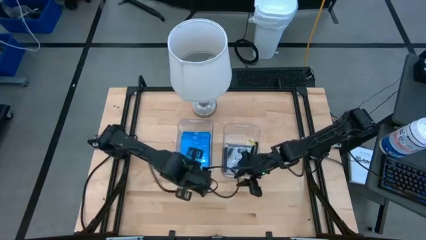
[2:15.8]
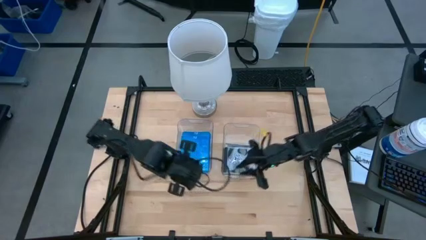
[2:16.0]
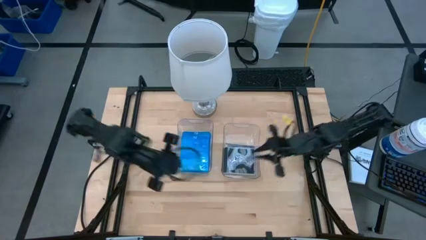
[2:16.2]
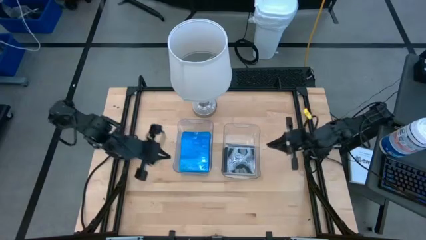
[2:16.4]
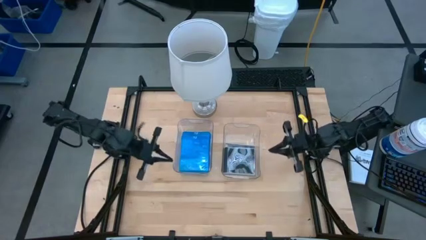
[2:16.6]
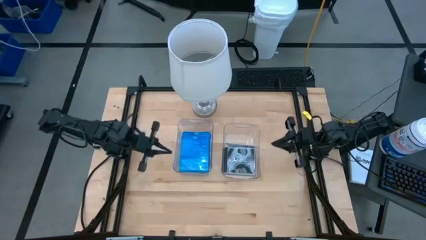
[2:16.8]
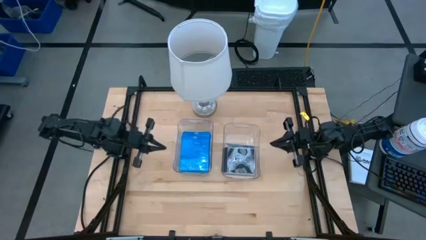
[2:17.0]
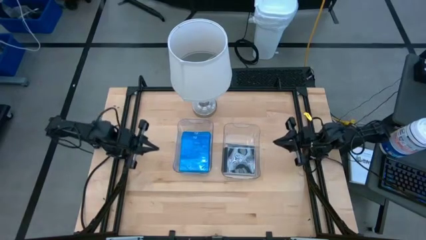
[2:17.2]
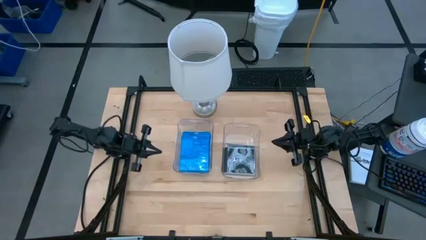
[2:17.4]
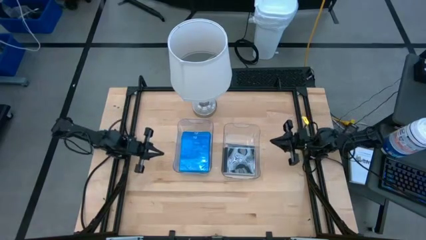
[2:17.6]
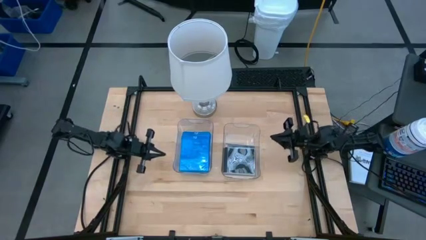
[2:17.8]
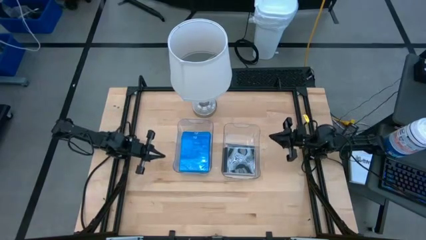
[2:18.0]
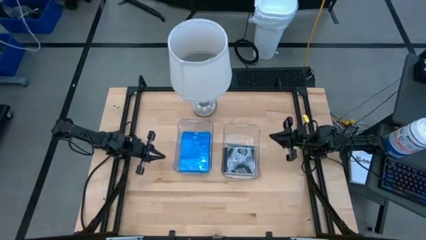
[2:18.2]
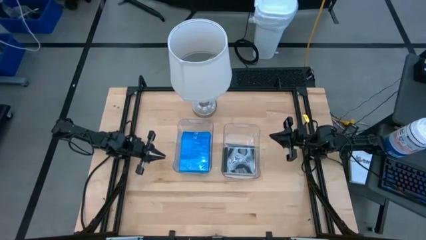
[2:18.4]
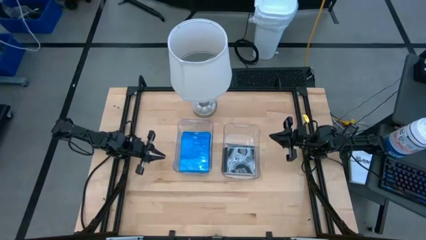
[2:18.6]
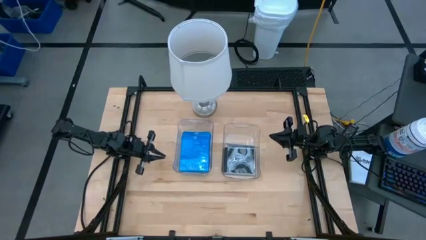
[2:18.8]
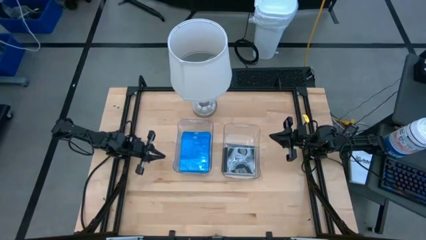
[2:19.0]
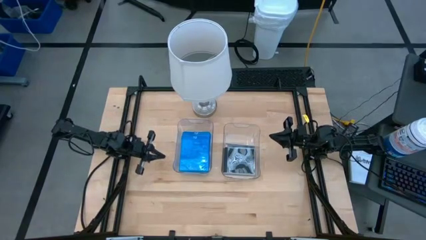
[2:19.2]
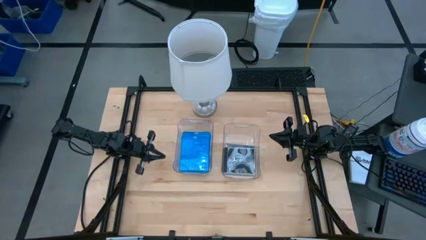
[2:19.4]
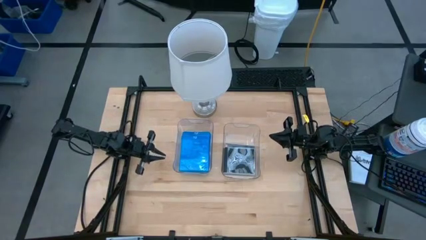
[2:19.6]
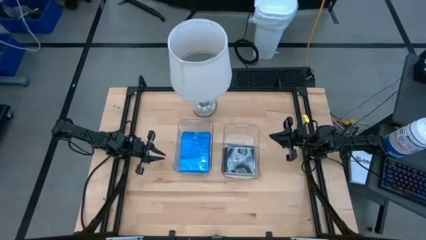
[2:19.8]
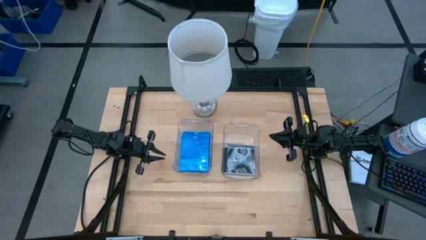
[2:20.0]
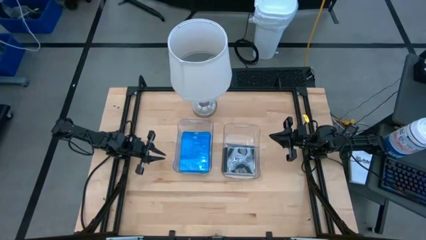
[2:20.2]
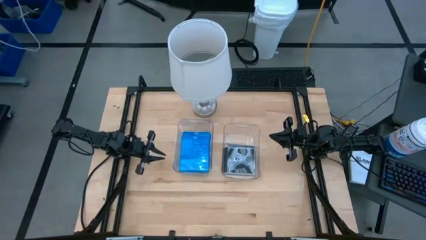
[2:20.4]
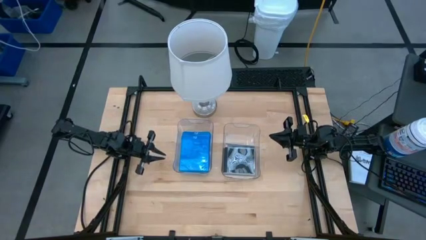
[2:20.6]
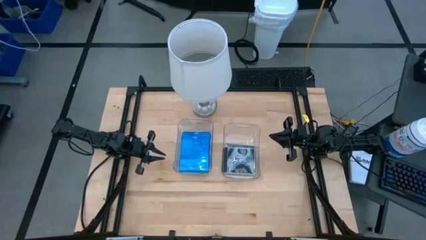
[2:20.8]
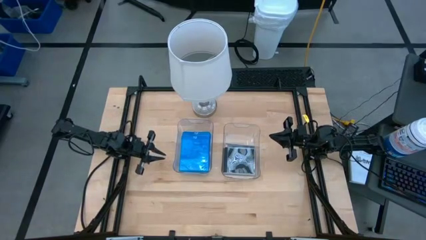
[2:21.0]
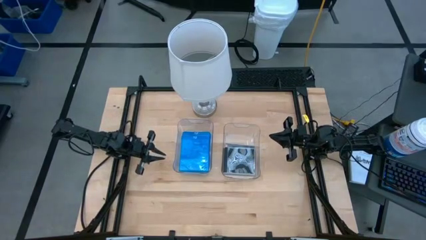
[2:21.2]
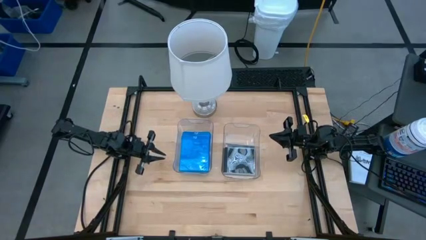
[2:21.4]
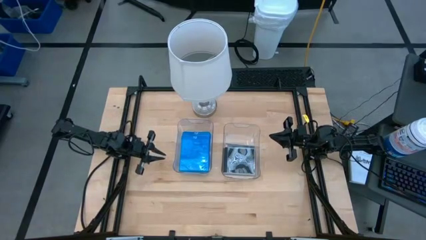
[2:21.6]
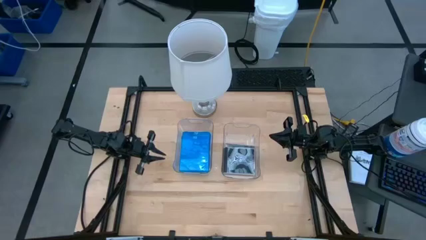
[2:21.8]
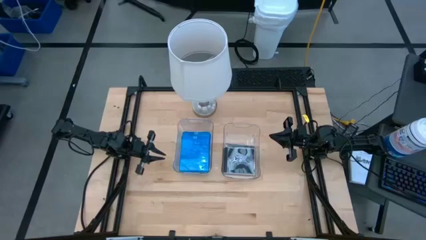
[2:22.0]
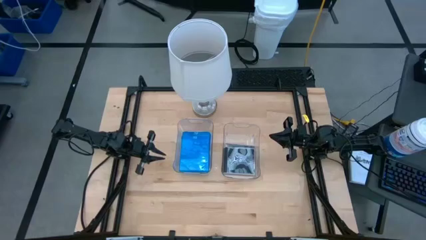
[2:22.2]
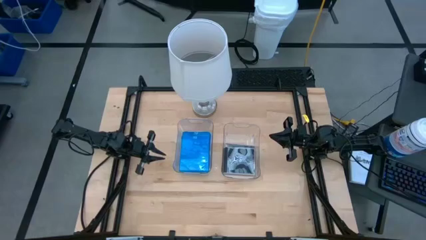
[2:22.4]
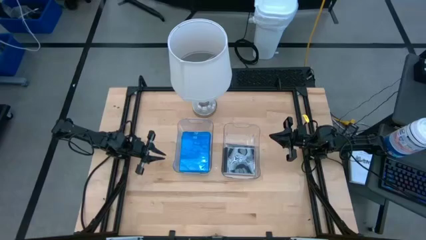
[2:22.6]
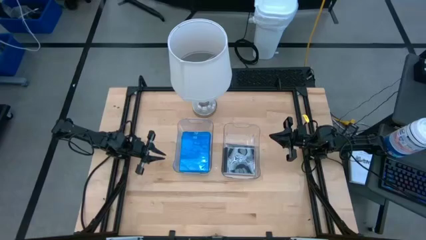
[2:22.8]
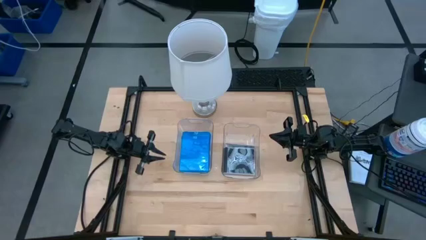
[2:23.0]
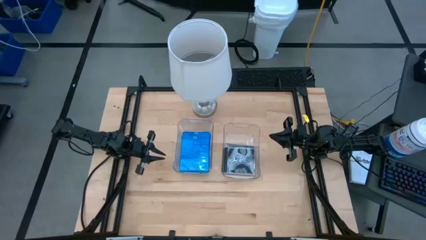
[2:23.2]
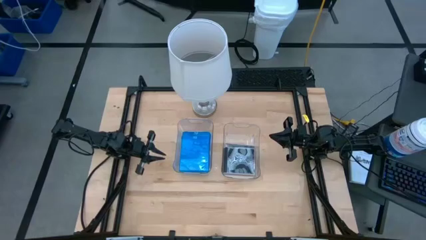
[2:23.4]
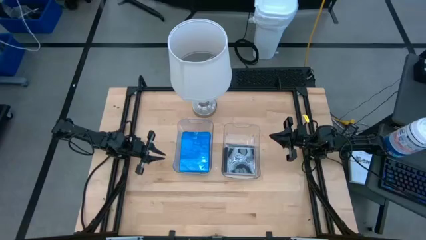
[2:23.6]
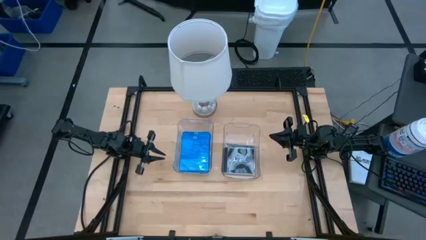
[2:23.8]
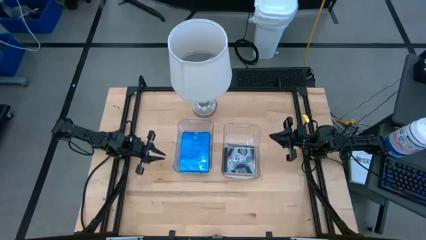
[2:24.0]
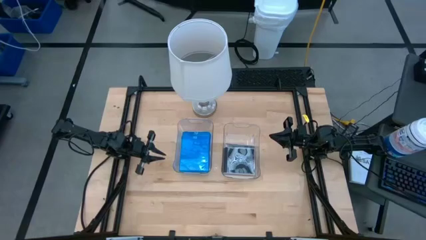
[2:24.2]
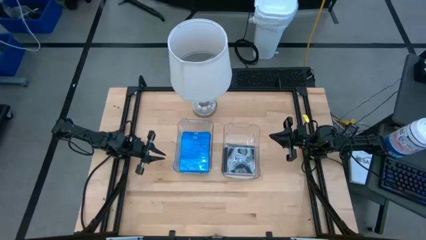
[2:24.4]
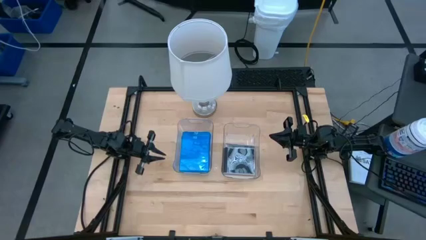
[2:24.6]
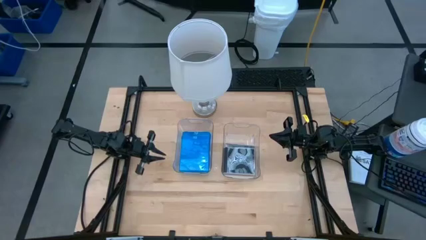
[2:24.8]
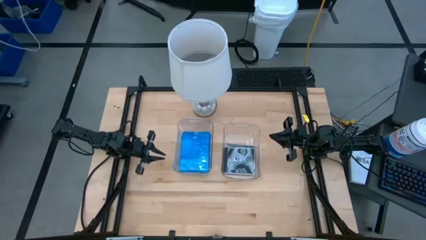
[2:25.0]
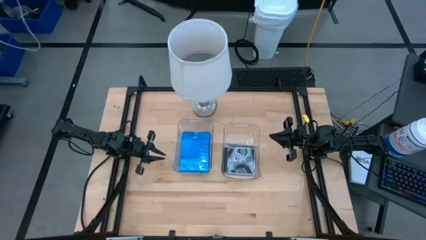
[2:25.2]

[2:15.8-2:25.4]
Task: Pick & place jewel cases by type
Return to Home Position

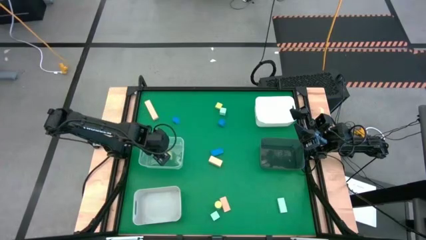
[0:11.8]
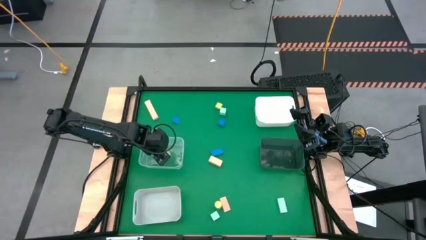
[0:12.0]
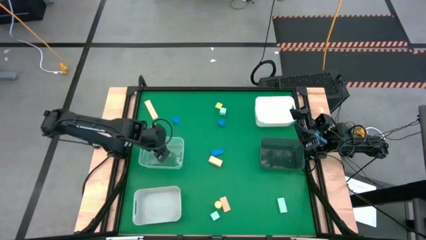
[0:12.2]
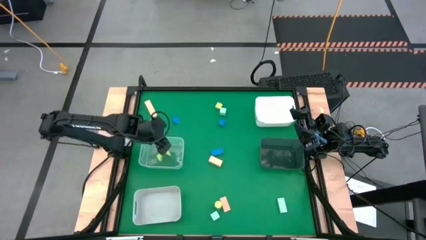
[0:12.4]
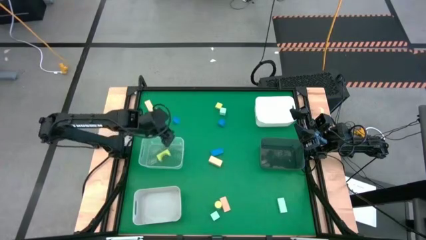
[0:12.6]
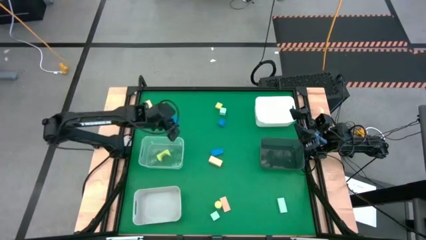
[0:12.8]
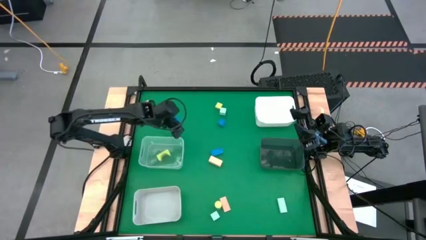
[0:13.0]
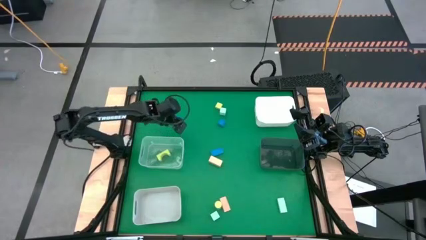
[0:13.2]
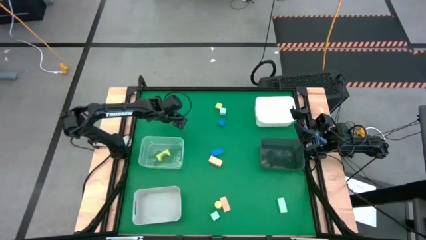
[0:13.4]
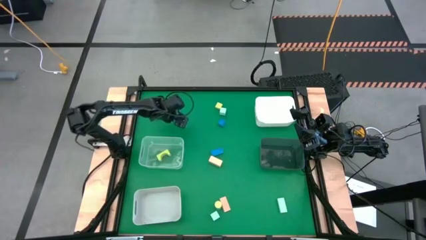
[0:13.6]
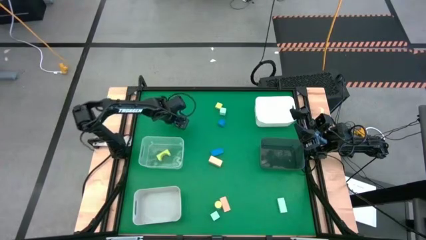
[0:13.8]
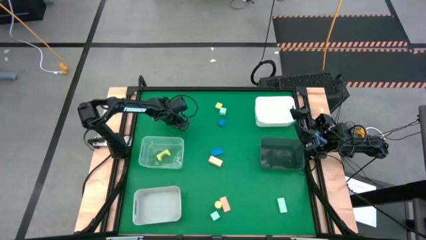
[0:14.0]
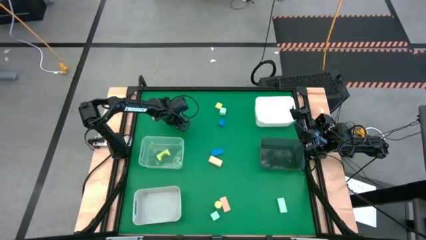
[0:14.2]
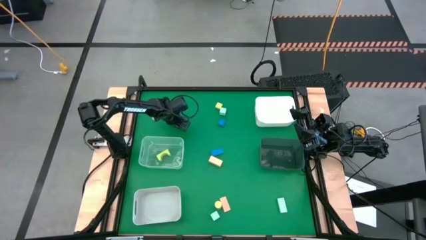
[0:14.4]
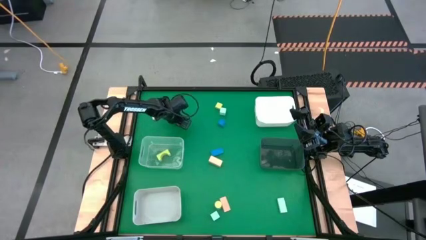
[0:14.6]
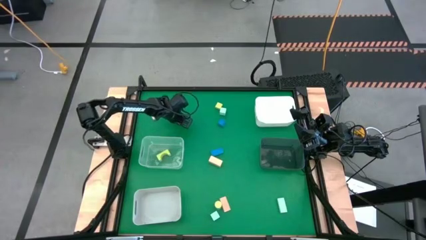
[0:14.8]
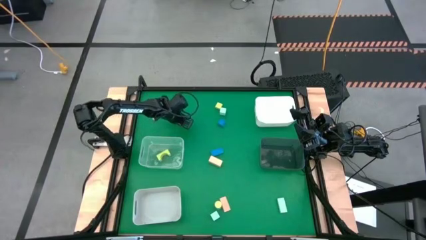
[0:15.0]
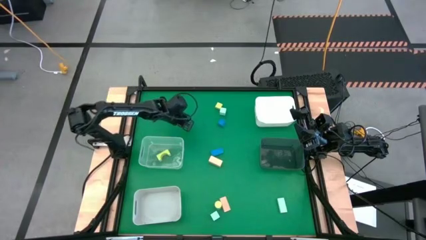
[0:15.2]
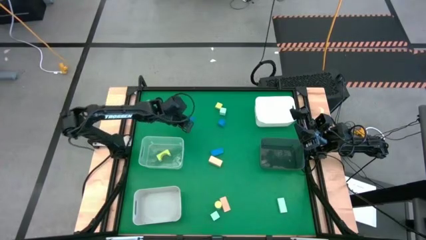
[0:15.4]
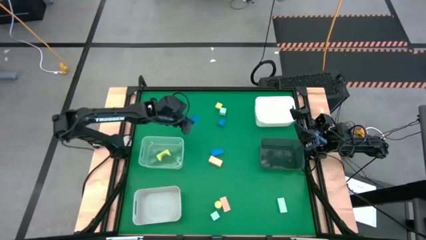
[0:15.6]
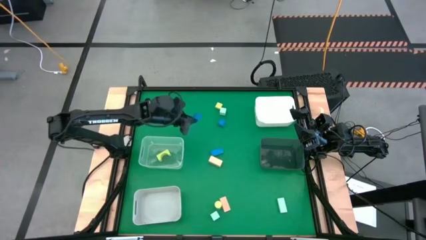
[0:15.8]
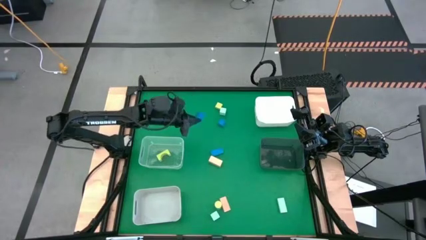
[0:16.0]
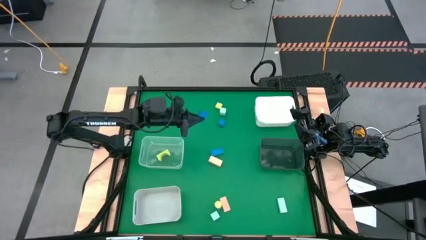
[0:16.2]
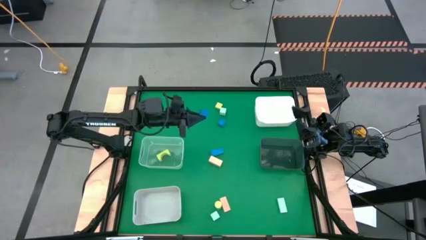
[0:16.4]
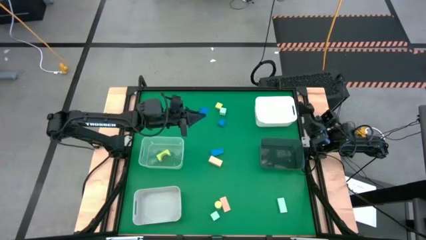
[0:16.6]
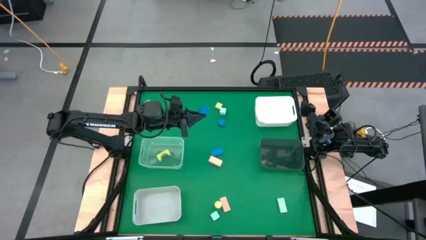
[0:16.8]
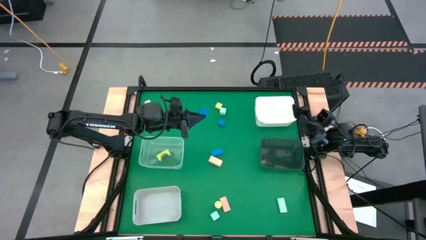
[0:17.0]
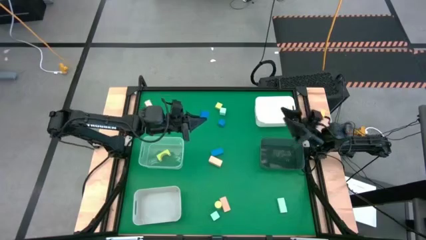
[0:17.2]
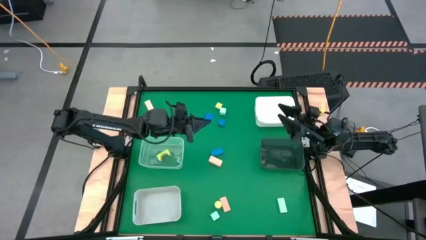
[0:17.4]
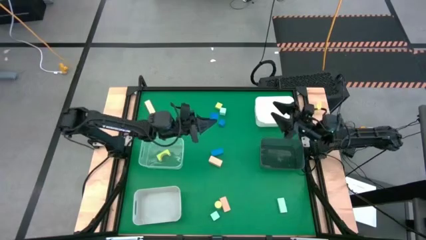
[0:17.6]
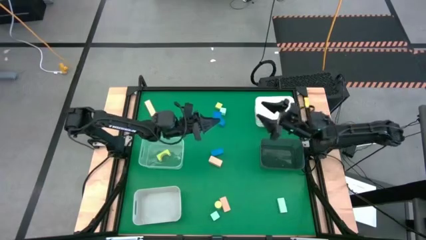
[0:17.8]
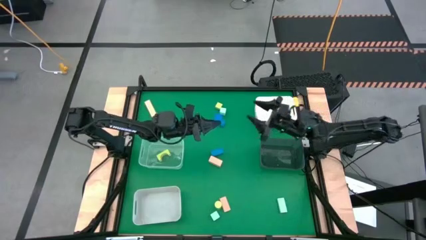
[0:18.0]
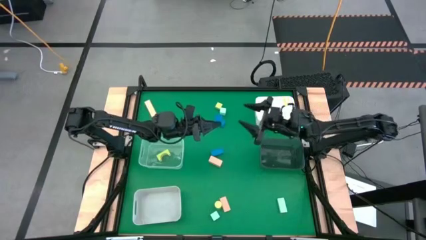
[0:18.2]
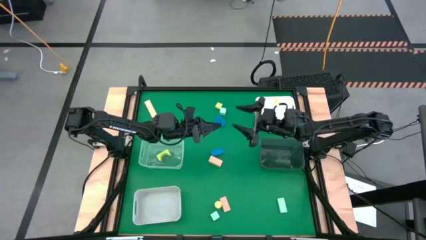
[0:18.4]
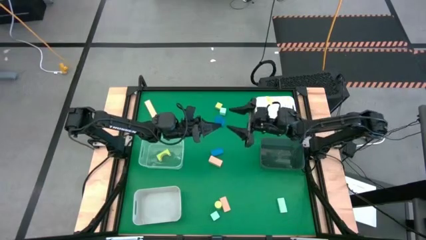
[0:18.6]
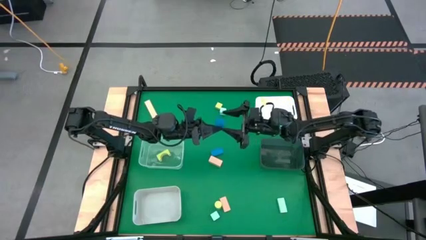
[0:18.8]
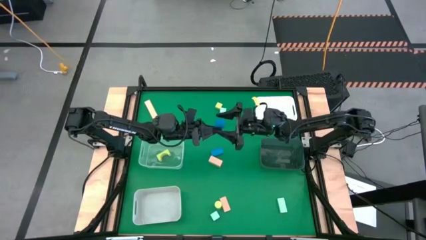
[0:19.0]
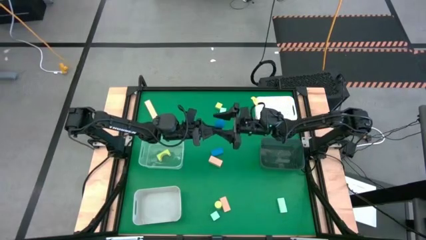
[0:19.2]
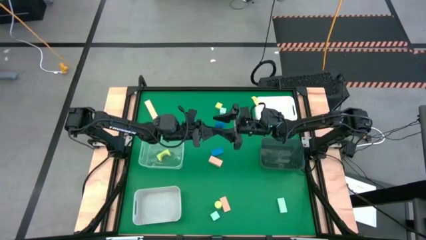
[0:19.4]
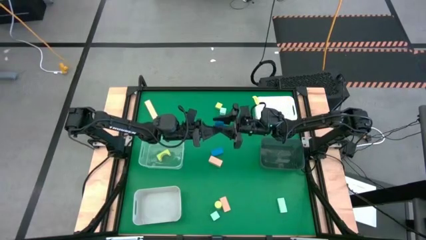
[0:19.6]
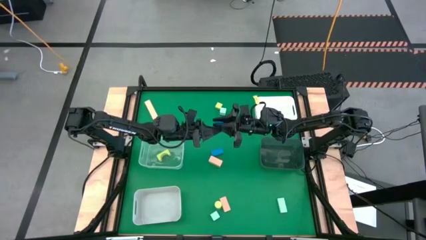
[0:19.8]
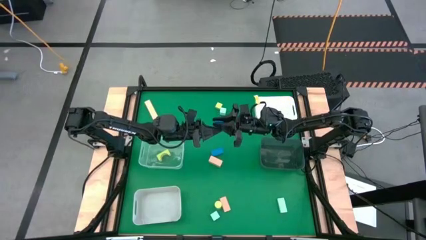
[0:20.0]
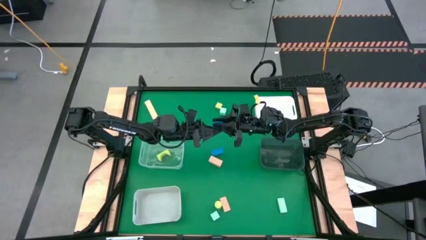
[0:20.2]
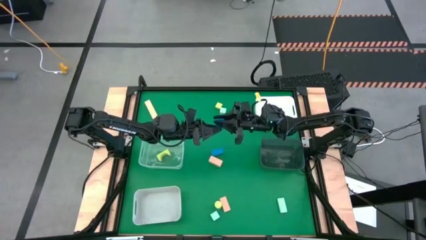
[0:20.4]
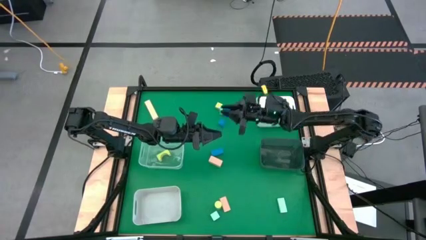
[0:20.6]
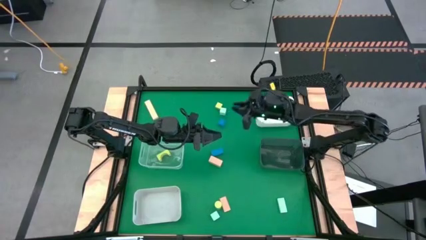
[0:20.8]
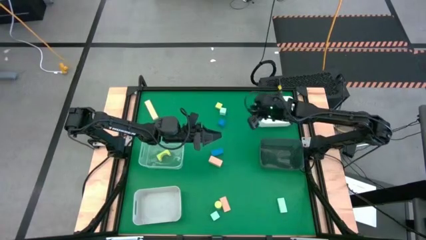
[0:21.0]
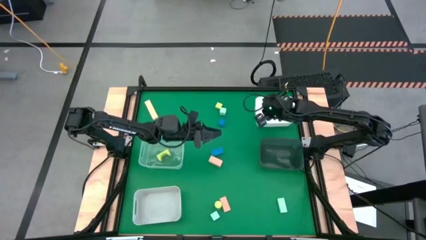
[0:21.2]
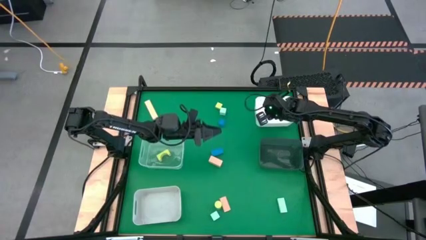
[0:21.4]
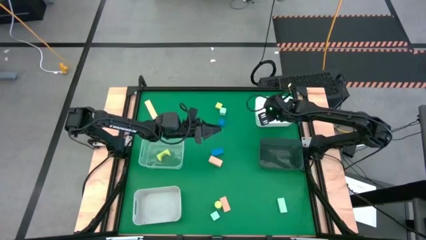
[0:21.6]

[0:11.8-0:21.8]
Task: Sort & place blocks by color
Put the blue block into the white bin
